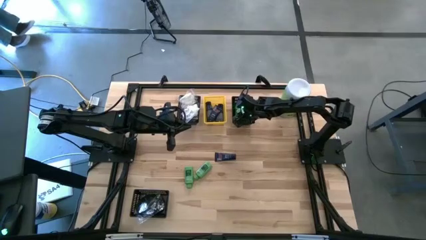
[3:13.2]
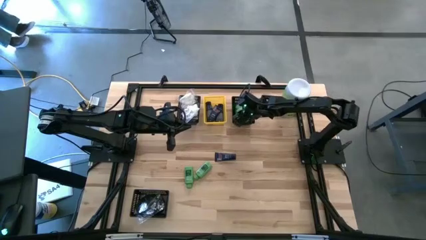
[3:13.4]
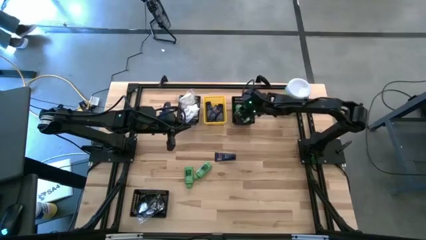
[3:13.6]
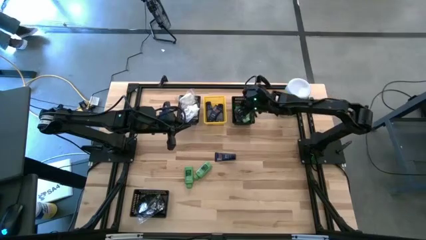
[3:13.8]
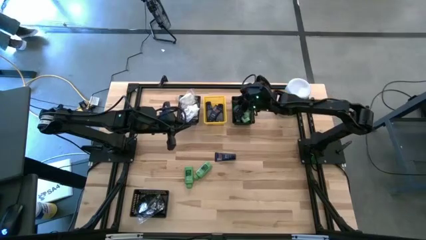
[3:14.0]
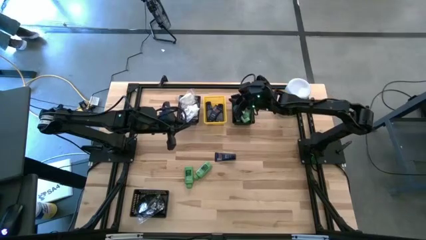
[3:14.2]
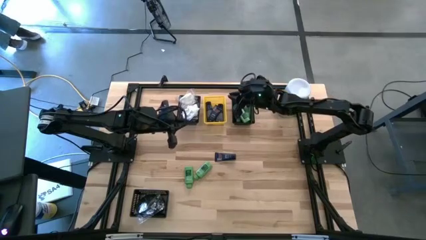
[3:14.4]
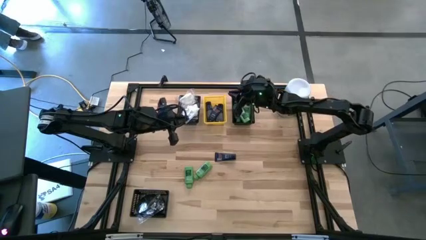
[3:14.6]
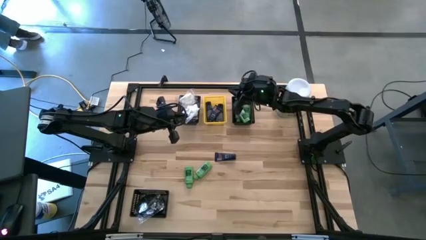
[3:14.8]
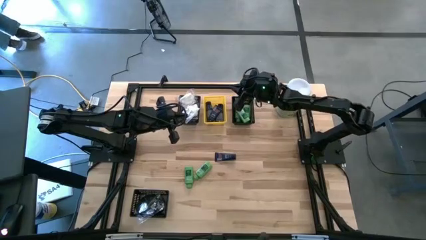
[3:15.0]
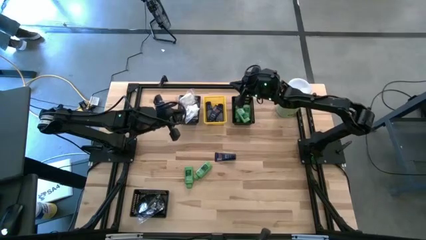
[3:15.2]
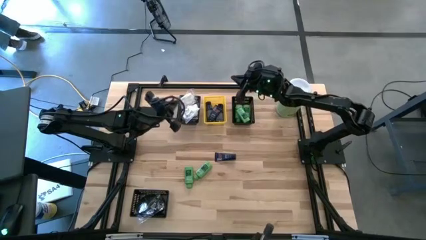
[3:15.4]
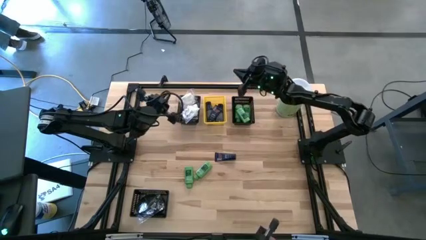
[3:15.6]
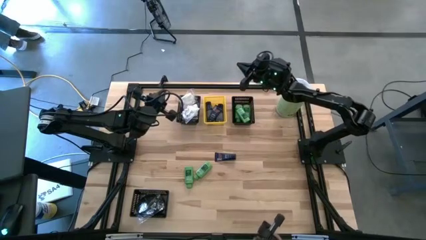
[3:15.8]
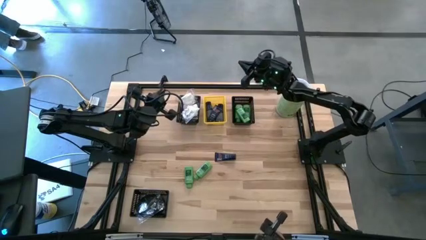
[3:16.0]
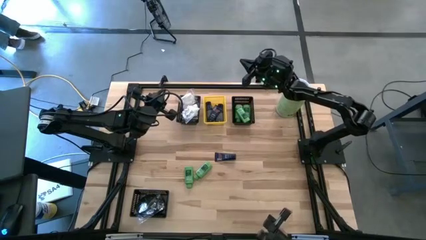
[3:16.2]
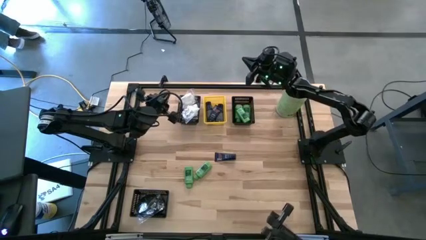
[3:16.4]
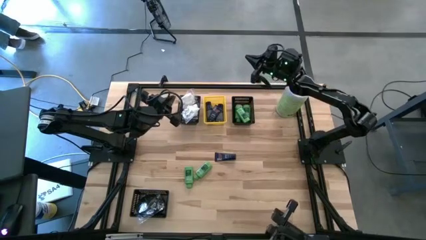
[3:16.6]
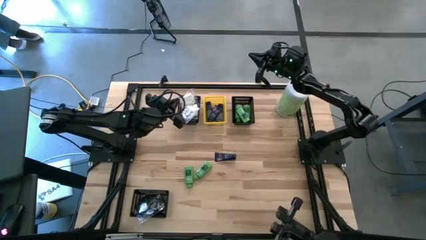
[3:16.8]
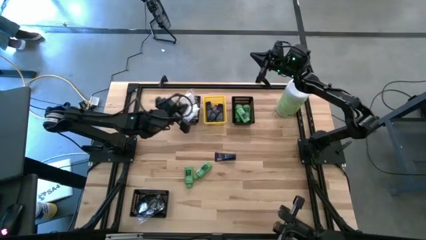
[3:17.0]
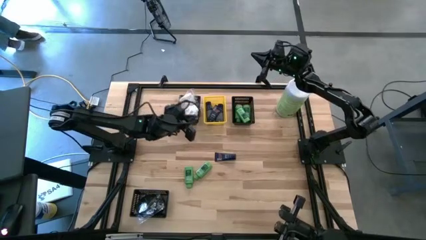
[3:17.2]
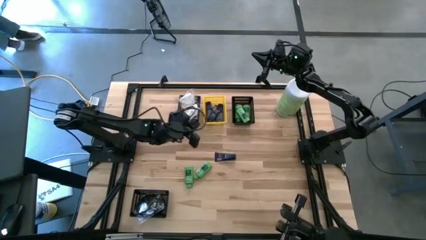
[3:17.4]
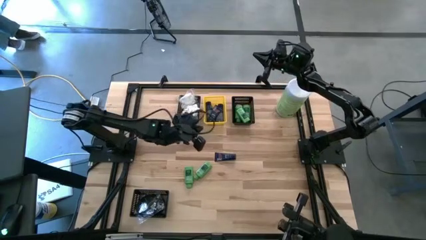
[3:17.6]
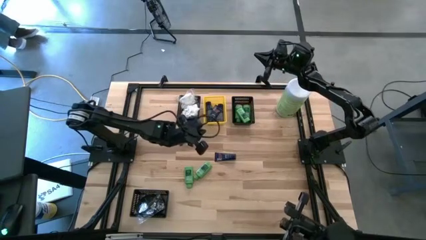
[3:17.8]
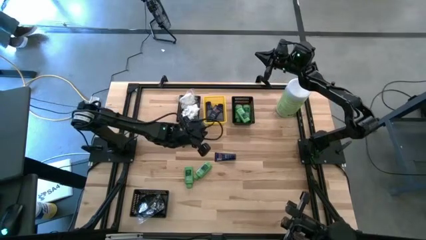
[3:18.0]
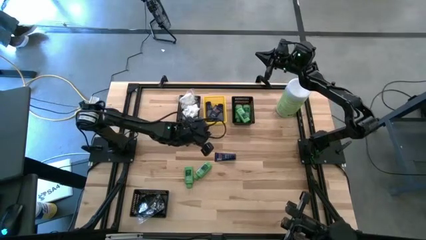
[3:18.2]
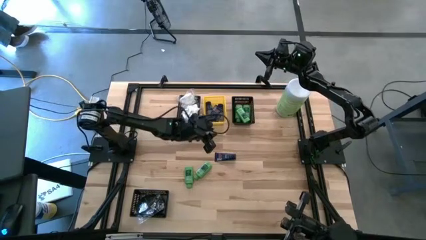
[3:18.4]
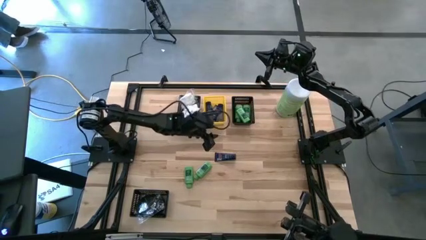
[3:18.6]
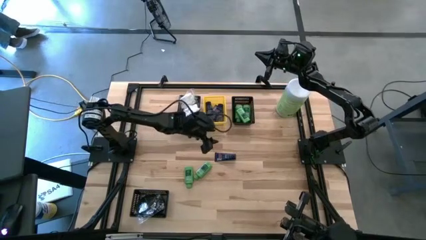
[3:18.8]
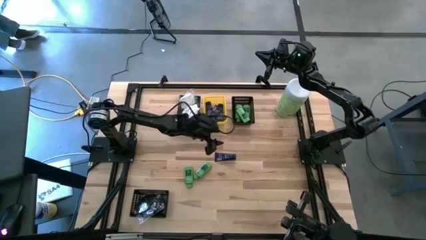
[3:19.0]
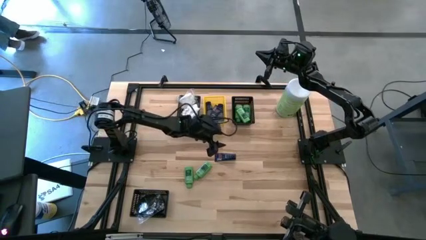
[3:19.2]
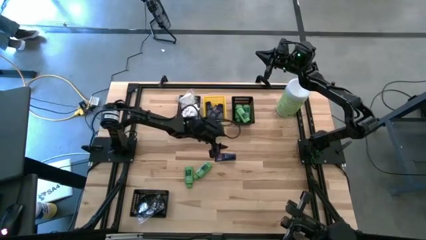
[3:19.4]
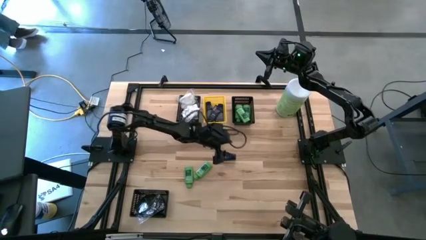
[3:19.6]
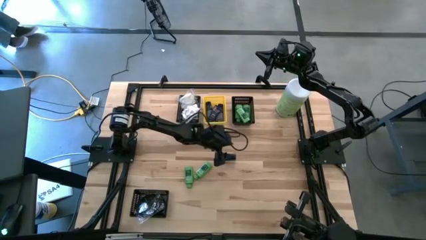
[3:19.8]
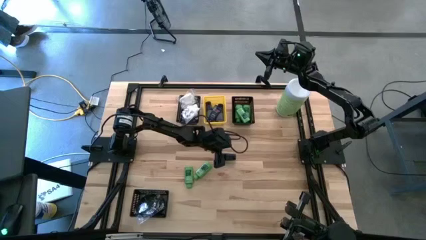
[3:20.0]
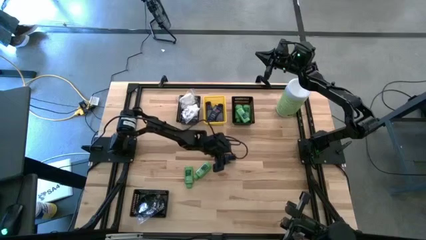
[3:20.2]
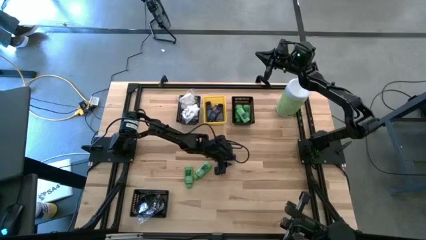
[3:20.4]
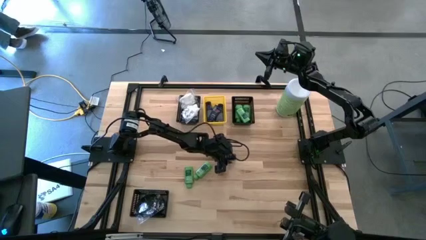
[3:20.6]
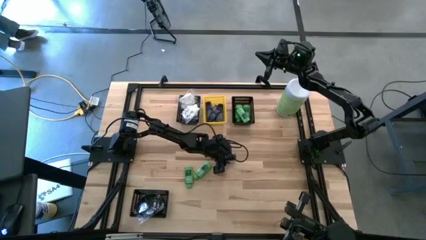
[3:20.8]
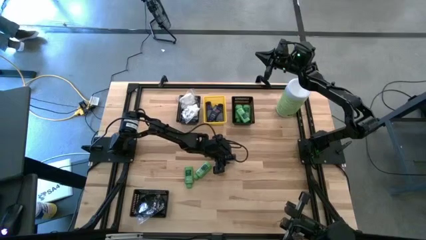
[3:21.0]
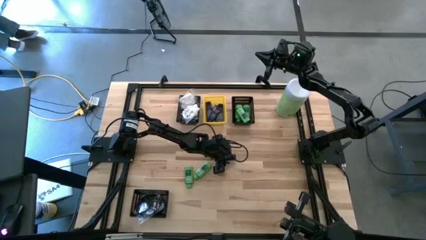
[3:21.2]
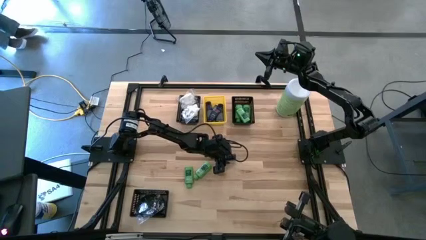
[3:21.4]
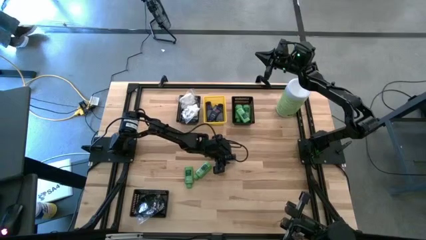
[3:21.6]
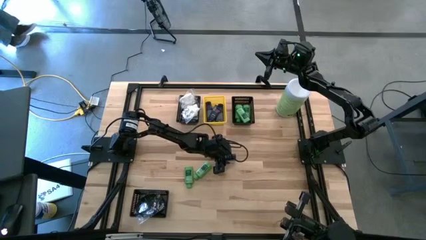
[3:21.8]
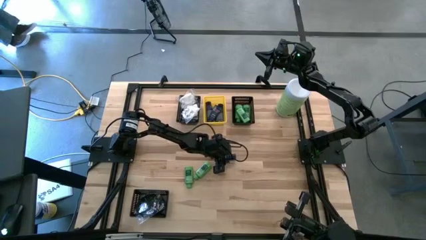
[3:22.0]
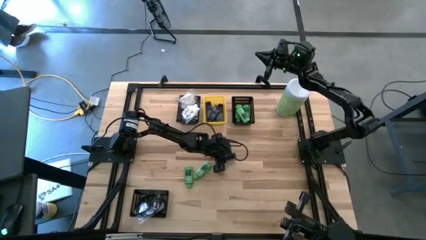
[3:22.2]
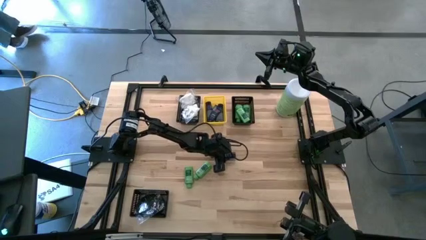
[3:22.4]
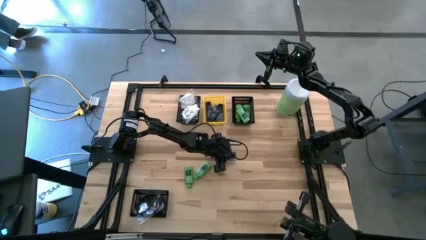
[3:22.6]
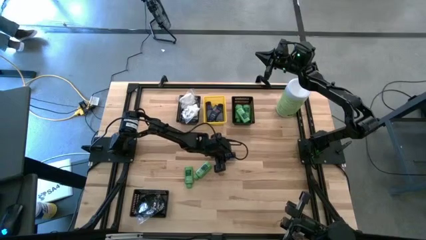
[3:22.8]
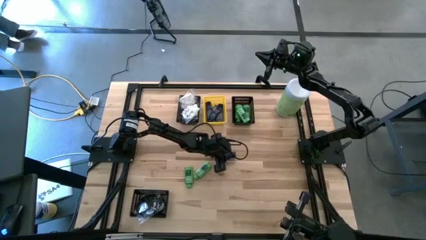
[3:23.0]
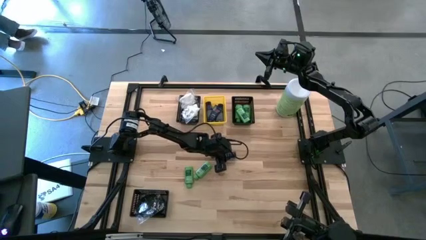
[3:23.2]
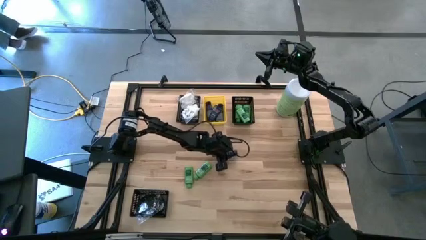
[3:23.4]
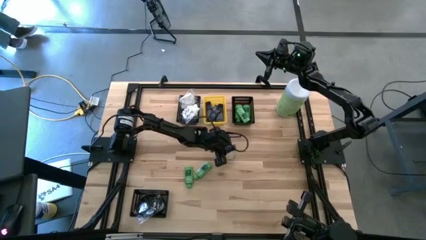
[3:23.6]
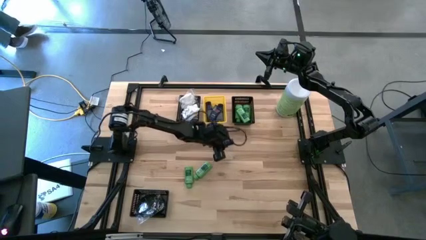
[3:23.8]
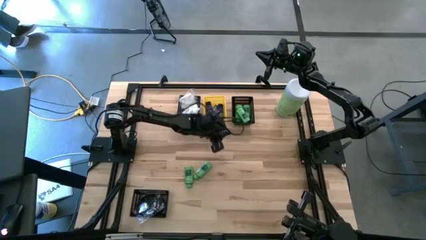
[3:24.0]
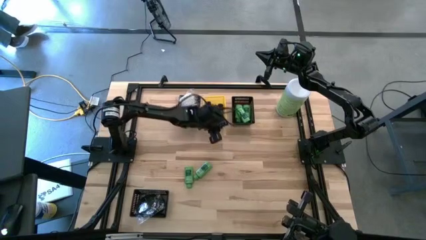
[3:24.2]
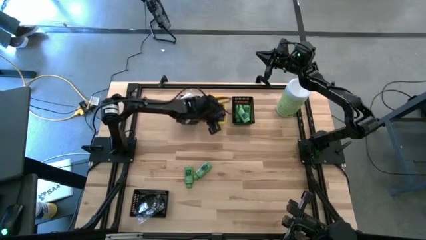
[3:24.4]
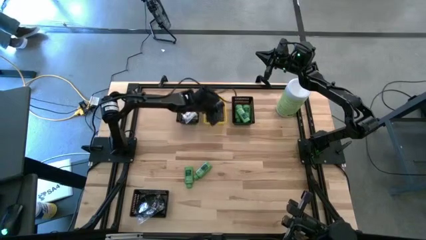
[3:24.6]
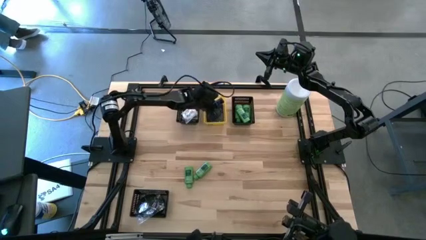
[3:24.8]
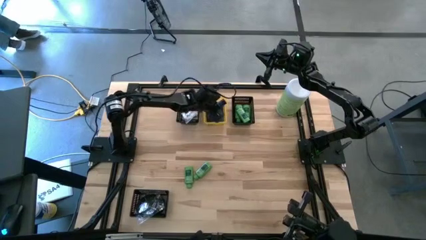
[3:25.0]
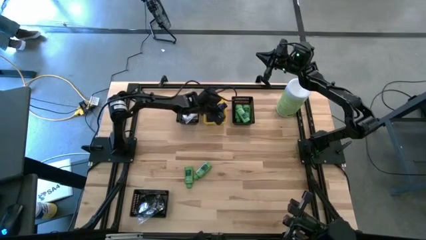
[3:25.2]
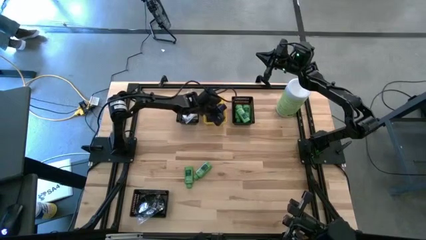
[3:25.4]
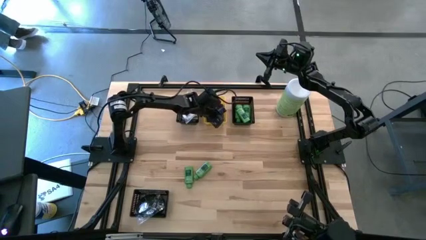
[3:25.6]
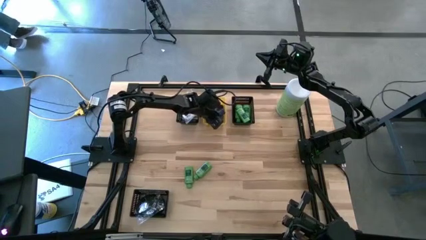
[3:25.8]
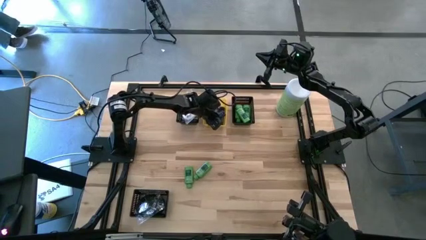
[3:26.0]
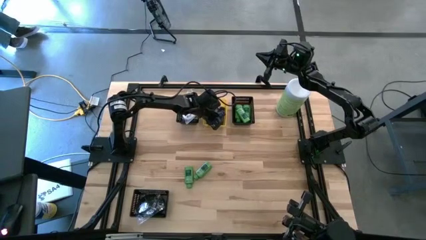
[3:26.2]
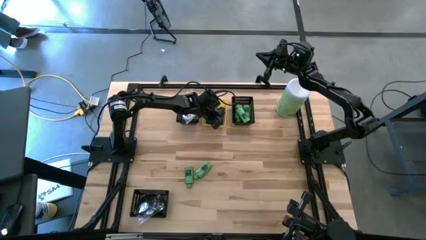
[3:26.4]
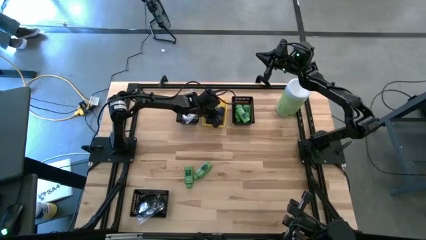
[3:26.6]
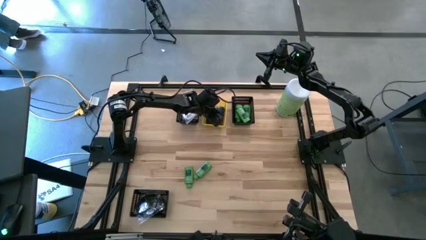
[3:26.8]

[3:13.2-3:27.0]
Task: Pick & Place Travel size toiletries
Put the blue shave cream bottle into the yellow bin

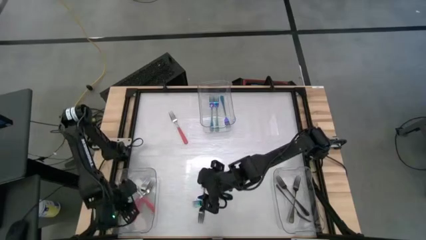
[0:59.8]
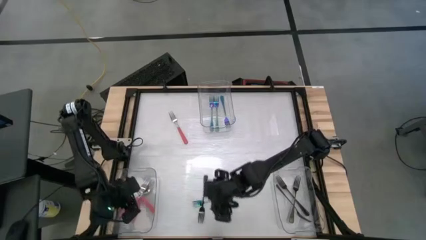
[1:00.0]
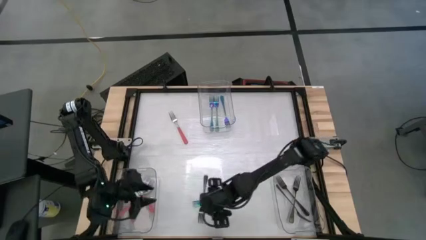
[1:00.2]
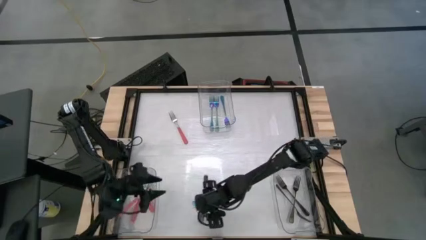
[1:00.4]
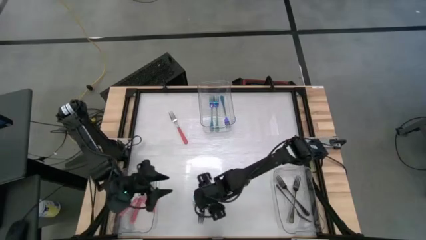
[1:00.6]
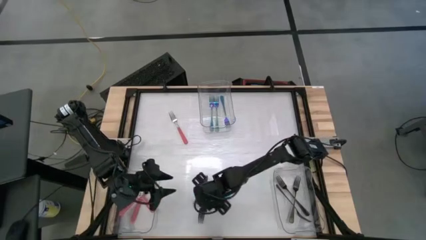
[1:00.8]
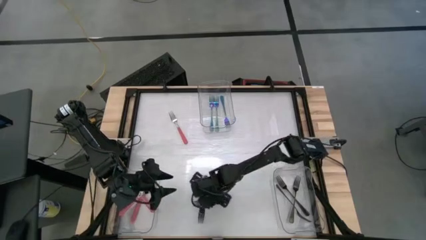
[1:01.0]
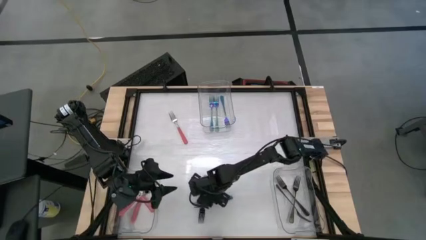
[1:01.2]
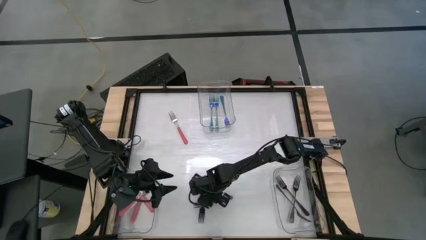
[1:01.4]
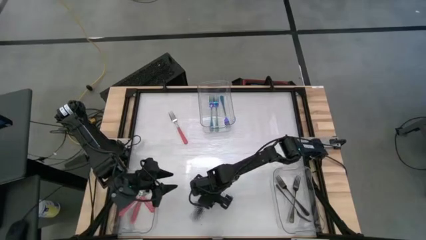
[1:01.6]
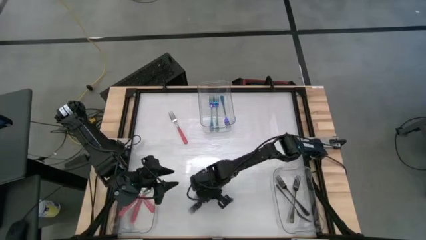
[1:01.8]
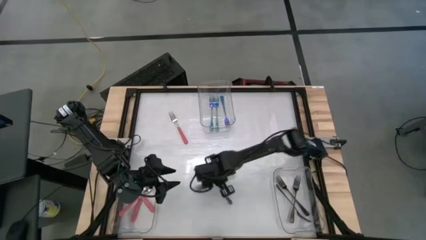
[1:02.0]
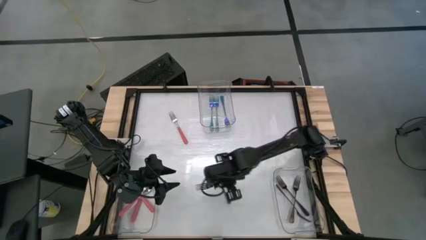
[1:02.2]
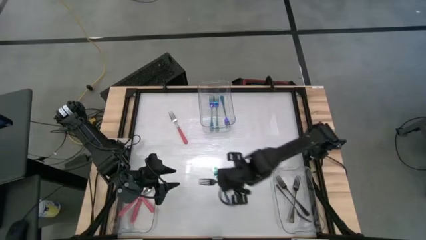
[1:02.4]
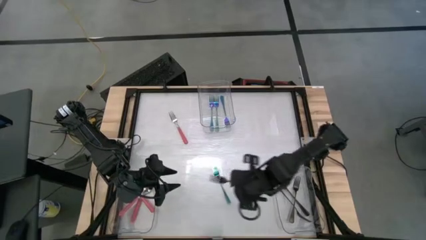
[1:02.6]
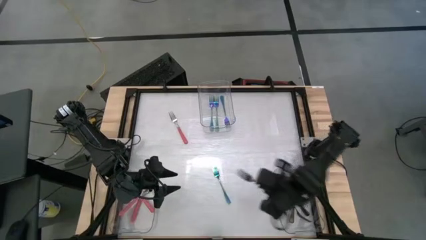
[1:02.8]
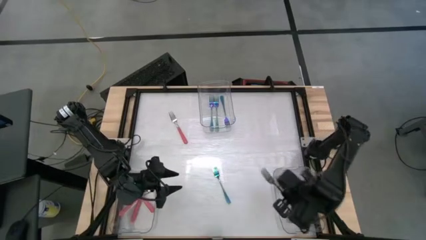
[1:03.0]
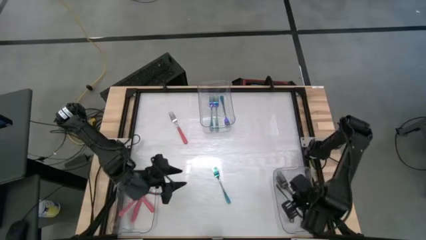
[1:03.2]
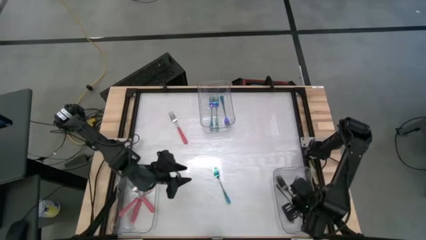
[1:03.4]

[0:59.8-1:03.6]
Task: Sort silverware by color (type)
Put the black fork into the bottom right transparent bin
